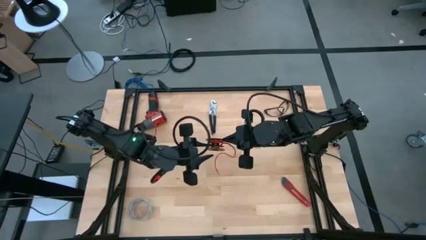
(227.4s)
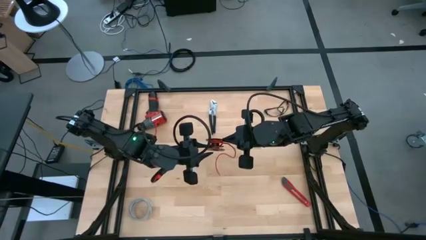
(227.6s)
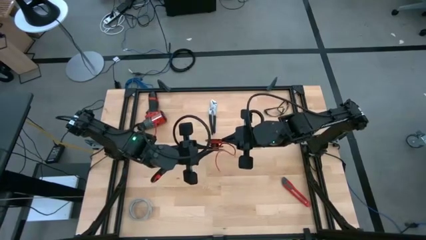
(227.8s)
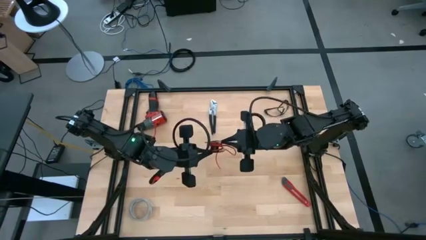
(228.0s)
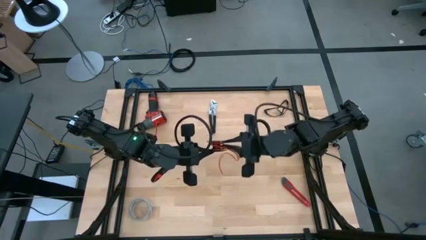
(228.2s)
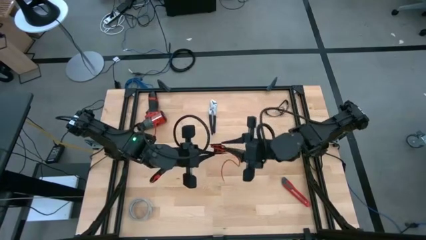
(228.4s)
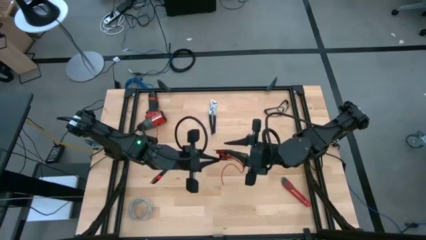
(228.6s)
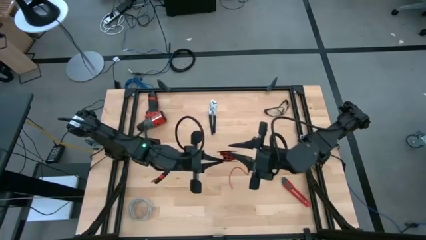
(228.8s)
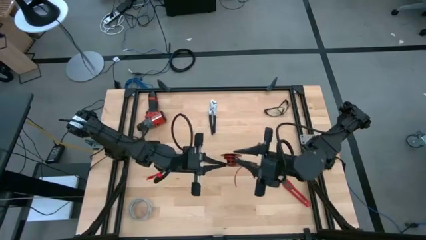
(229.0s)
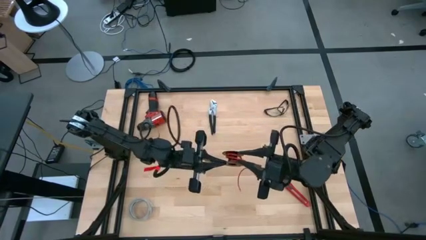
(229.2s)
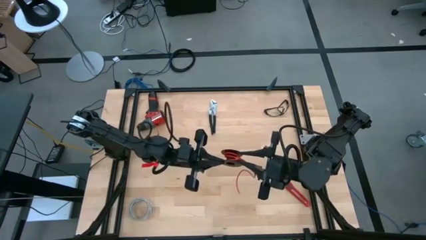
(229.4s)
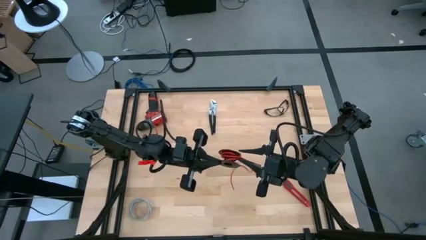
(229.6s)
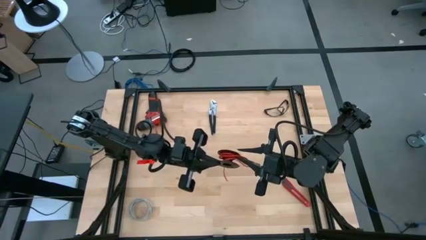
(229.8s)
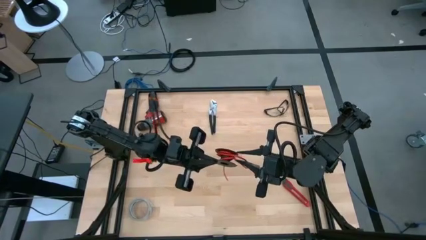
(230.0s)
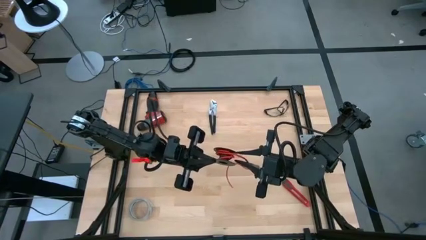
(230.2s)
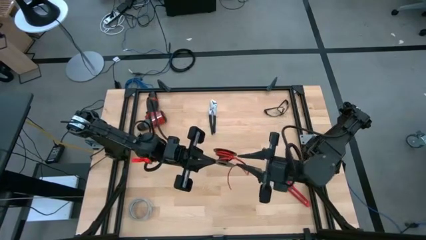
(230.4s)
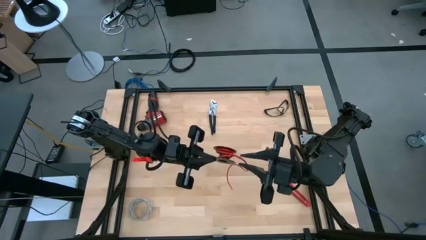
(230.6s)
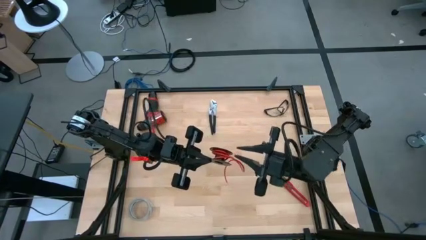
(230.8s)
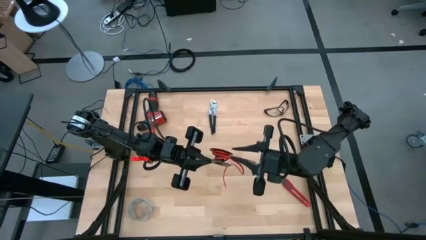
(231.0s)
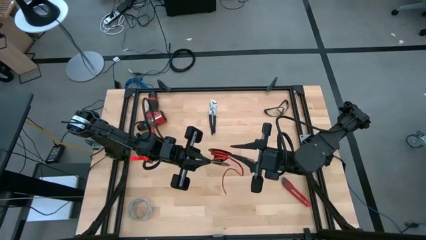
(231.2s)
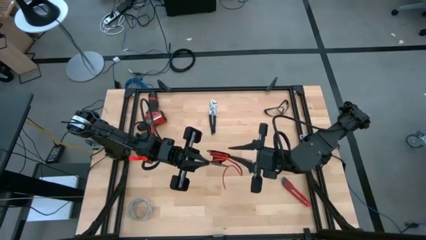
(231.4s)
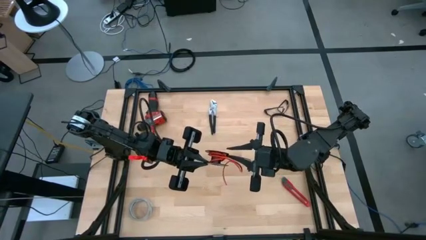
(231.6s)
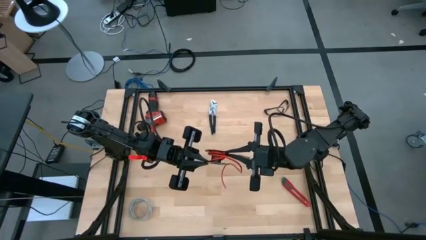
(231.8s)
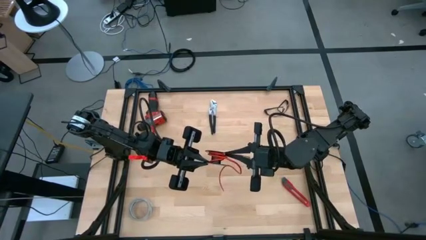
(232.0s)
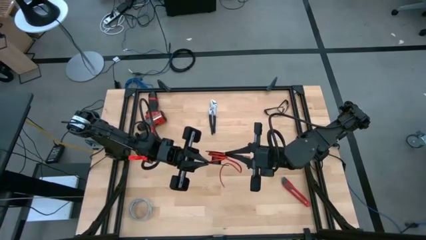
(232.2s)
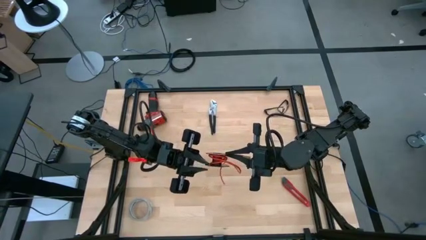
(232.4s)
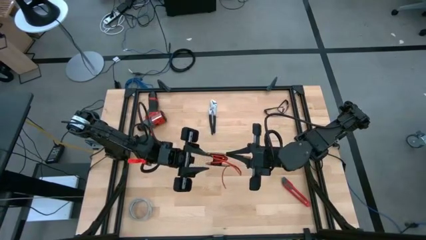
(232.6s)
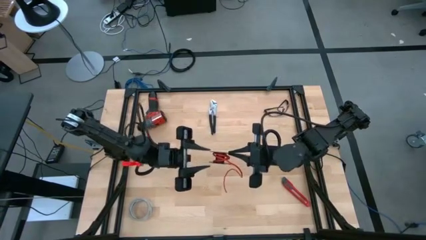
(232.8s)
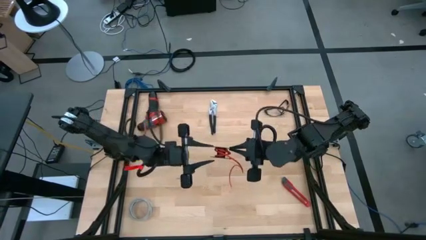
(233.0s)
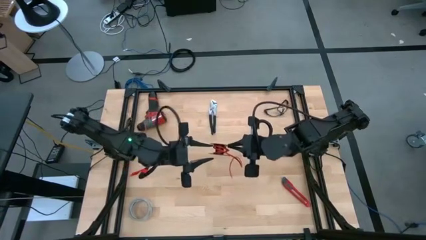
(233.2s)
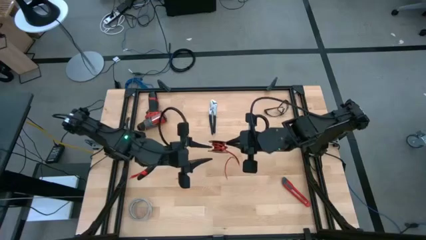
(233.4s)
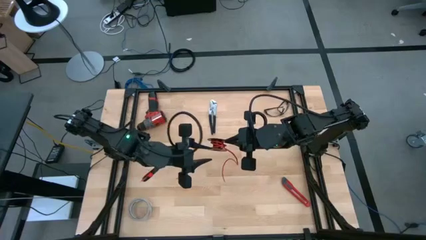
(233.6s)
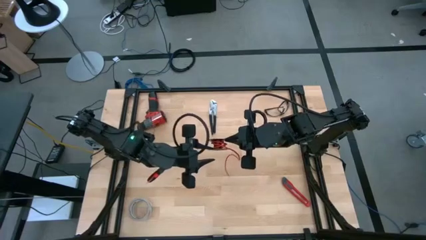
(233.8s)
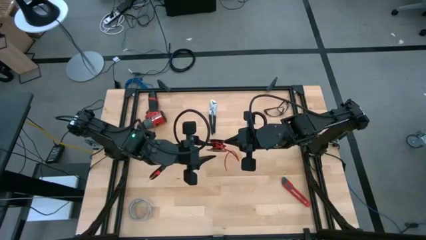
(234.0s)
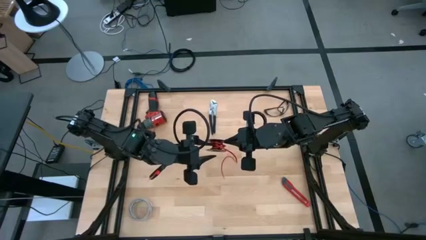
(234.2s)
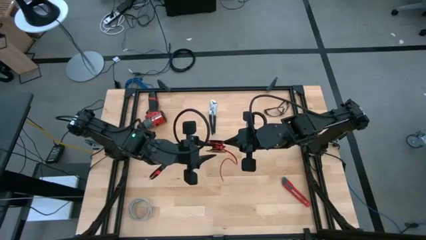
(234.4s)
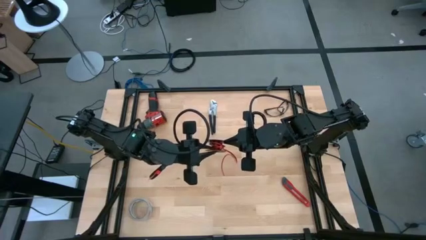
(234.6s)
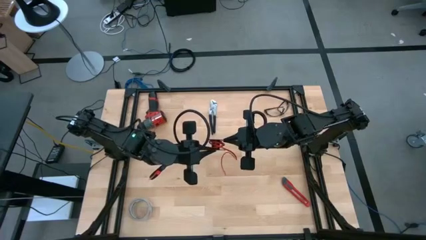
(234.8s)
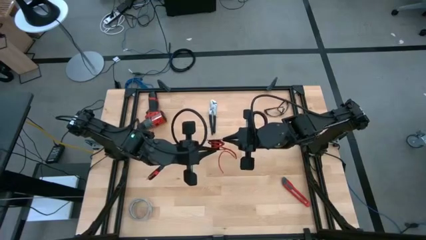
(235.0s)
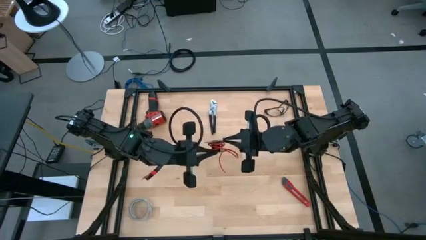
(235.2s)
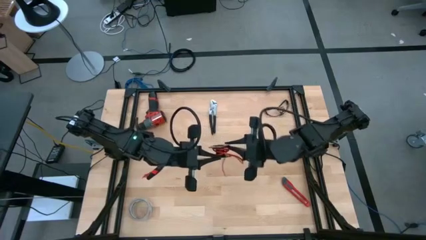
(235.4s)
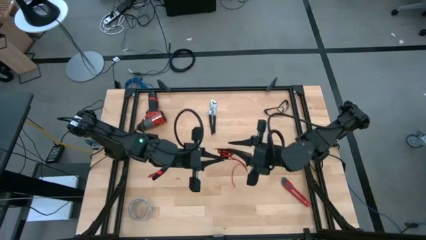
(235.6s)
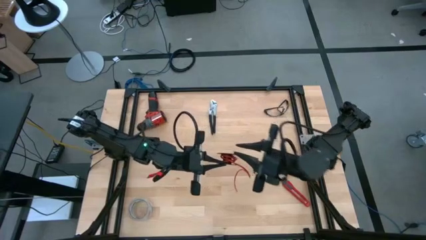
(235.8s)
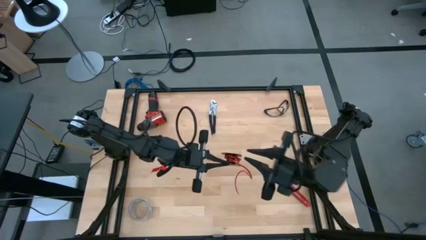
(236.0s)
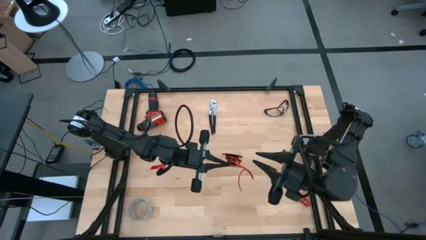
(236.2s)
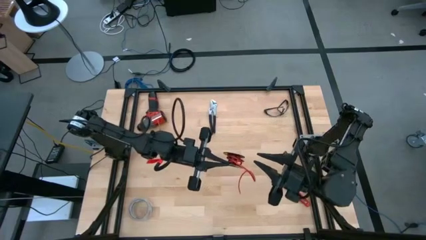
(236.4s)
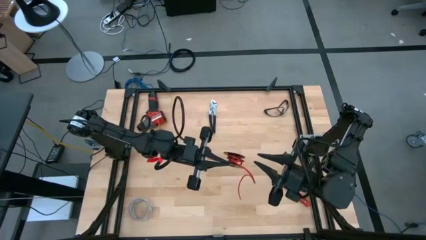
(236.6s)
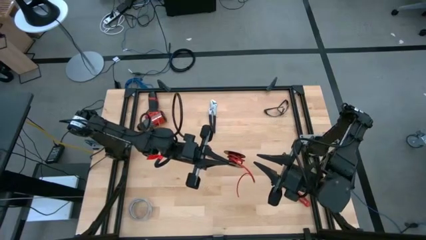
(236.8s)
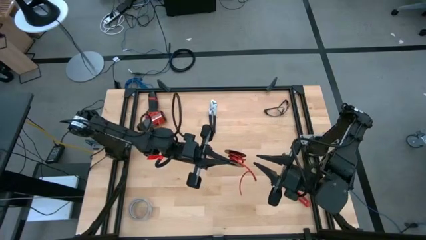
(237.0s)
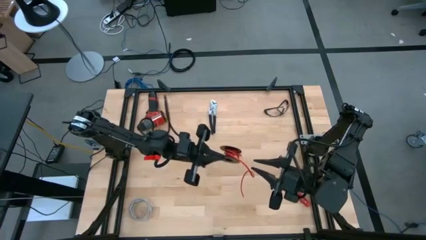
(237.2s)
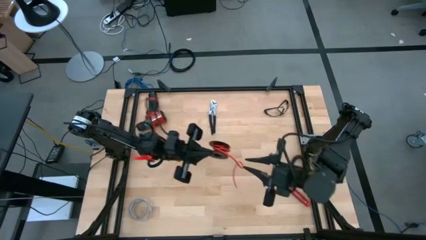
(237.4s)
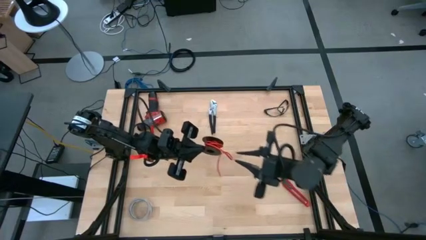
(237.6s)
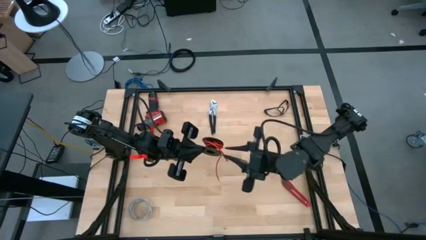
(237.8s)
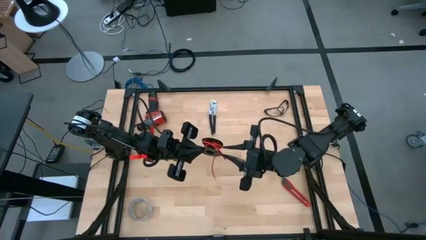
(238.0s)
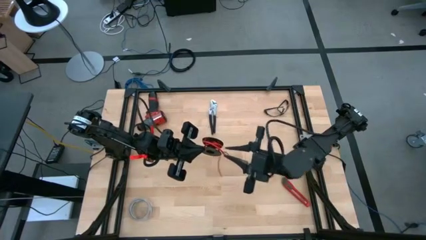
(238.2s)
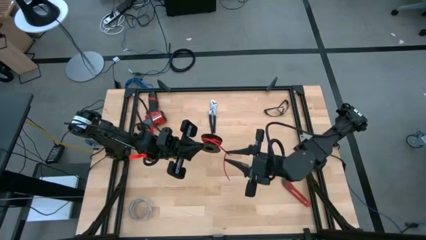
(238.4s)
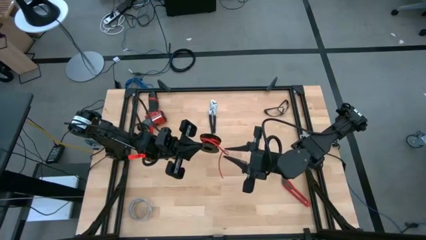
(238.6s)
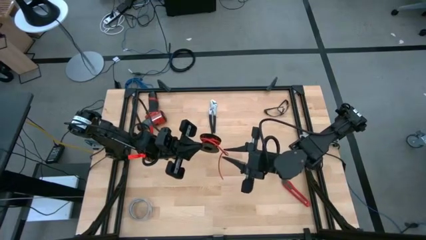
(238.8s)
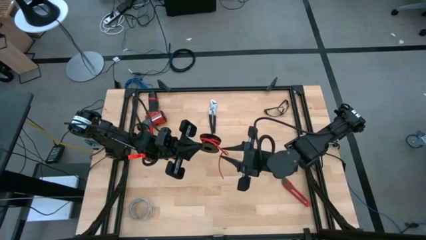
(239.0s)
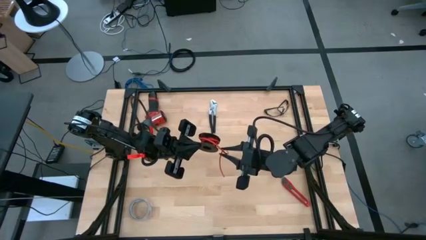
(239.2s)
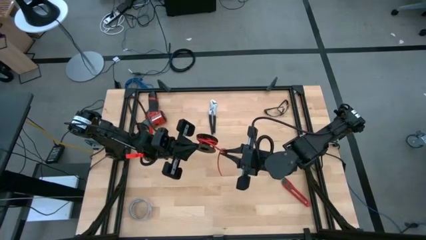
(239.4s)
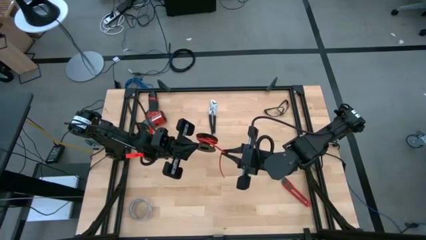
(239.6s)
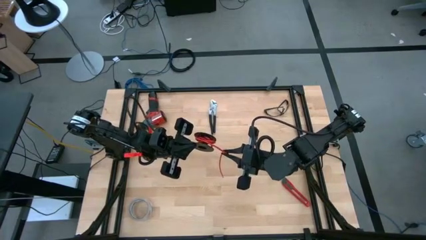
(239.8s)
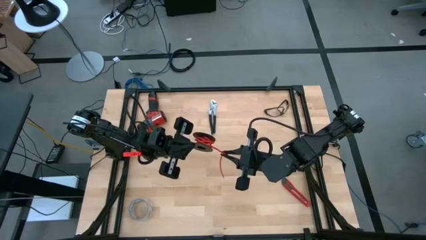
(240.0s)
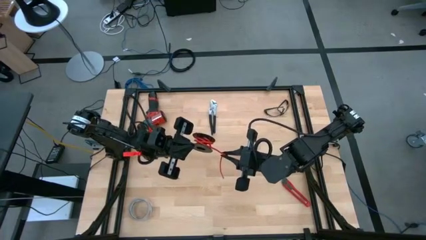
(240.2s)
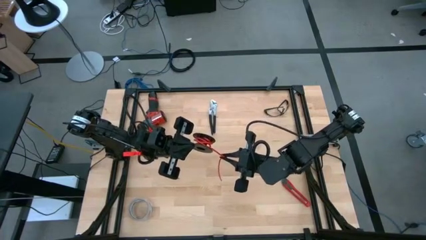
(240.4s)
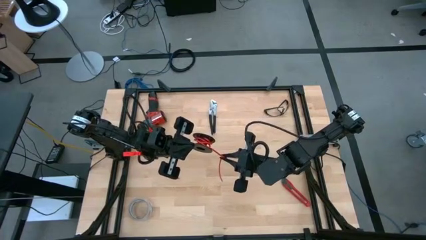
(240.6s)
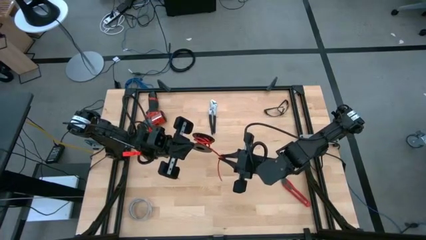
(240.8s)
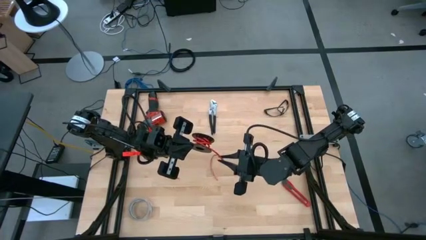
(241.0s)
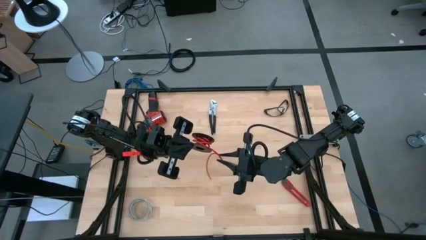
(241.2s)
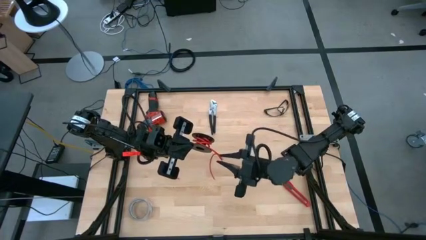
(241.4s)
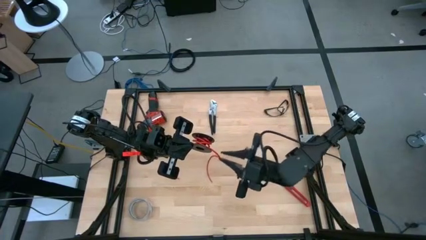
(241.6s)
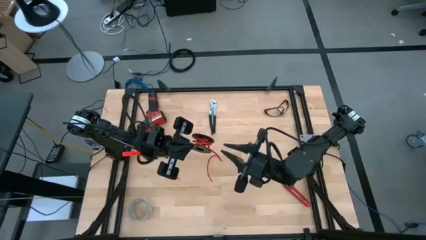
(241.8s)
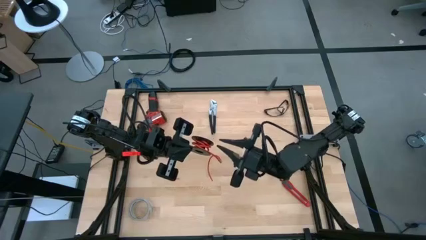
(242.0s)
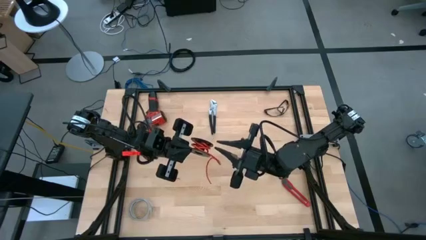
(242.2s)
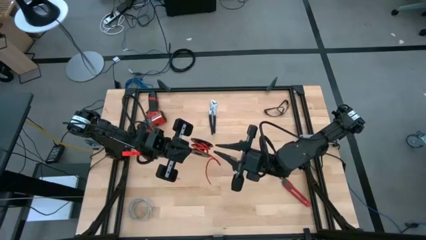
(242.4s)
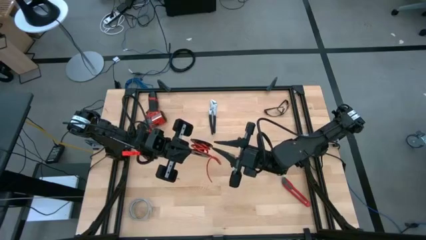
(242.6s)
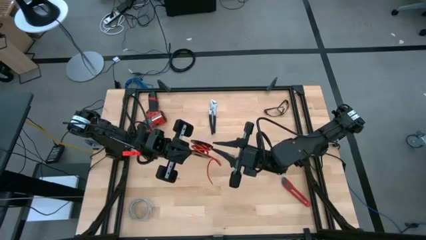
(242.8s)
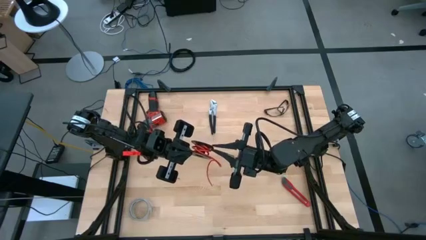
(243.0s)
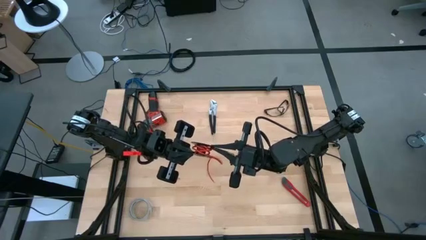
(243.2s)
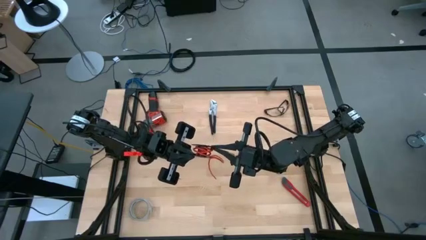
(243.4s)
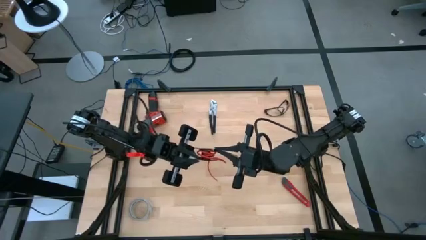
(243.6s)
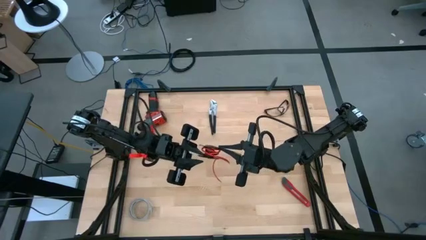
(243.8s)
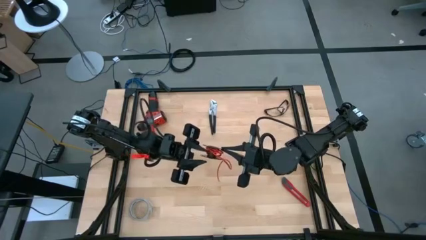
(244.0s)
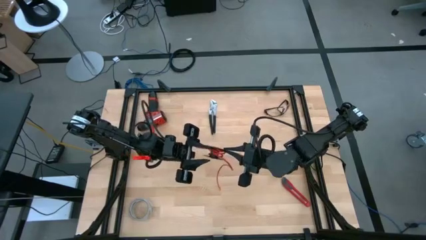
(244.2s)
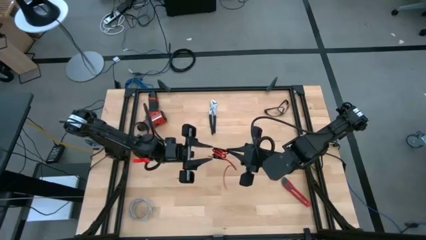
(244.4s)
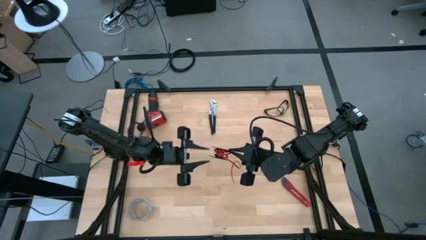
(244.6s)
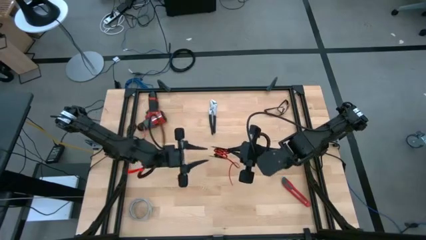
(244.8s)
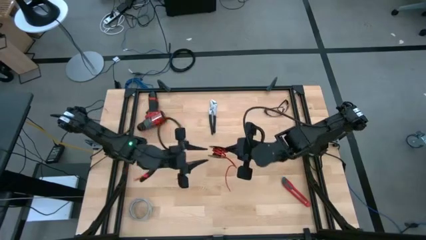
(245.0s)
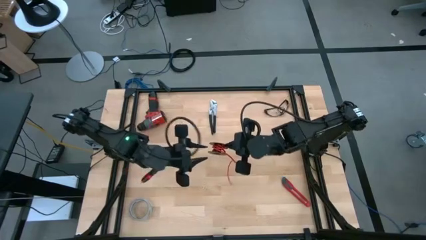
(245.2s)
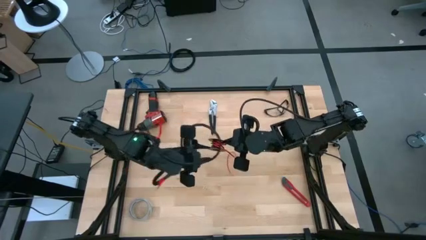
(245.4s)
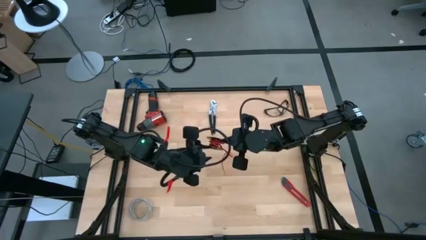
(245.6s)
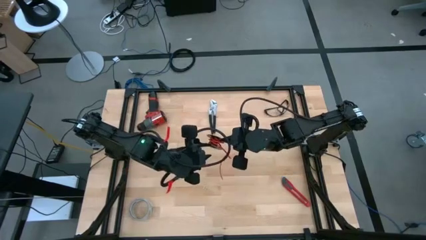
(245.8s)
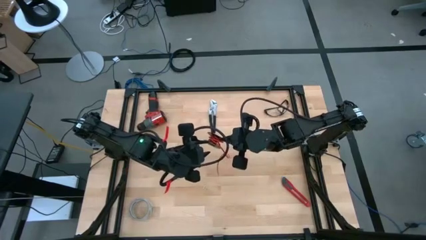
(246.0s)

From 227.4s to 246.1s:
Task: Coil cords
Coil the red wire onto the black spool
